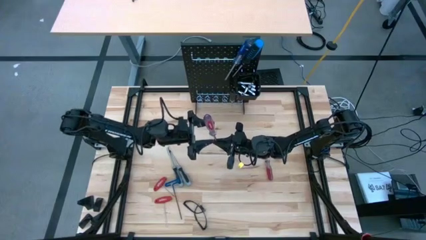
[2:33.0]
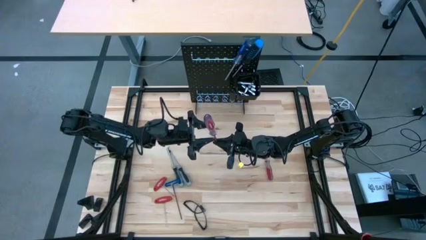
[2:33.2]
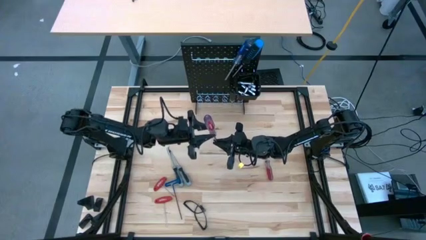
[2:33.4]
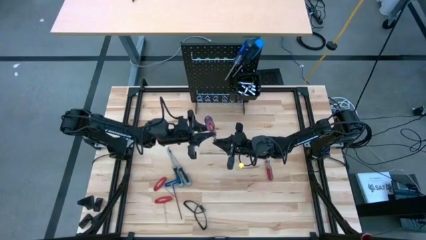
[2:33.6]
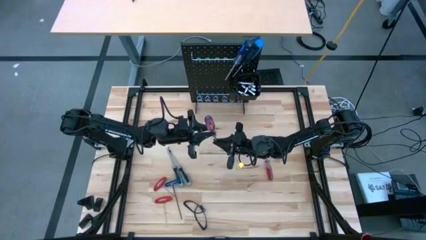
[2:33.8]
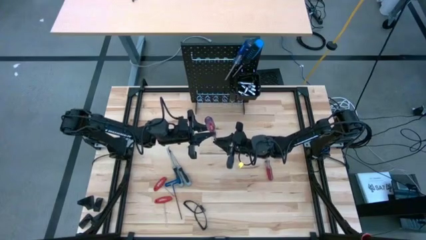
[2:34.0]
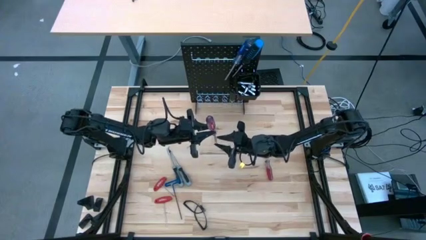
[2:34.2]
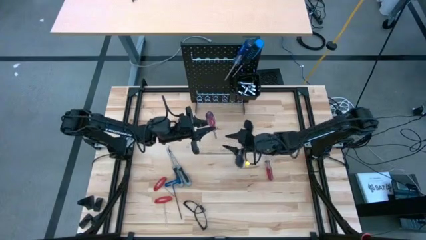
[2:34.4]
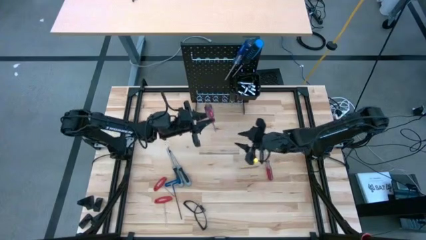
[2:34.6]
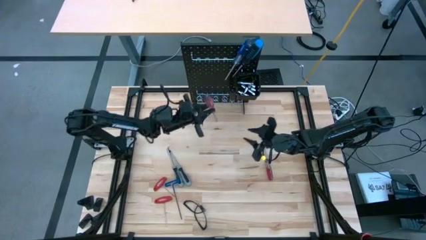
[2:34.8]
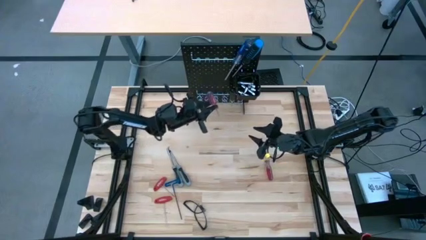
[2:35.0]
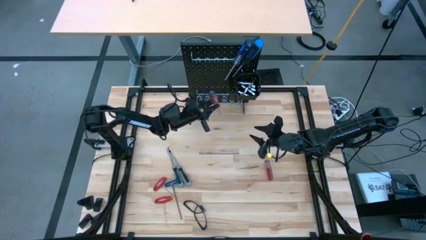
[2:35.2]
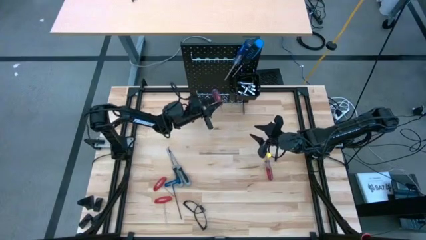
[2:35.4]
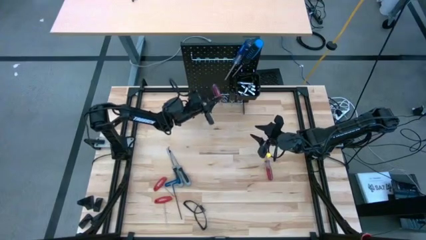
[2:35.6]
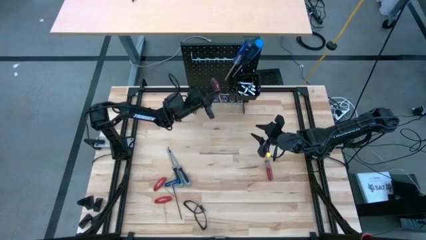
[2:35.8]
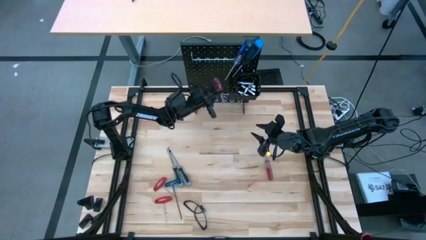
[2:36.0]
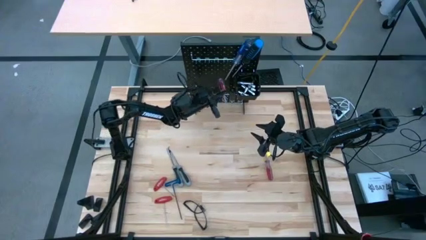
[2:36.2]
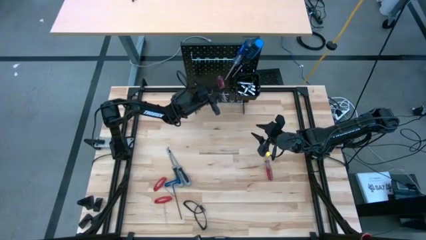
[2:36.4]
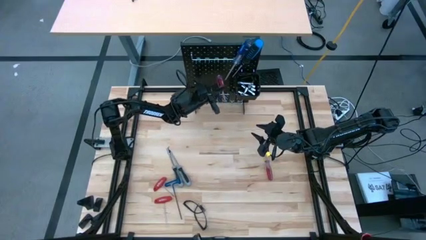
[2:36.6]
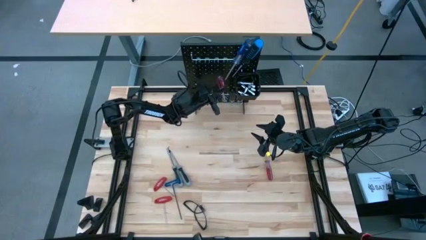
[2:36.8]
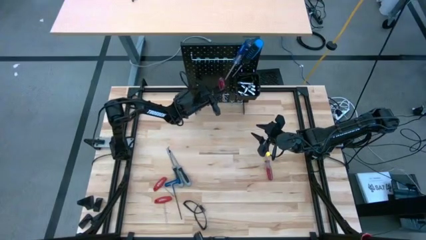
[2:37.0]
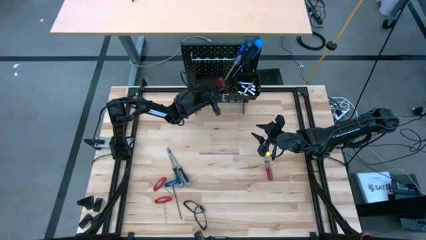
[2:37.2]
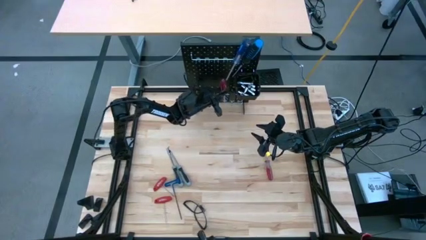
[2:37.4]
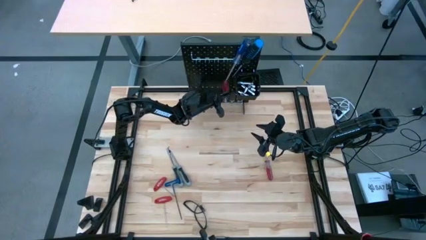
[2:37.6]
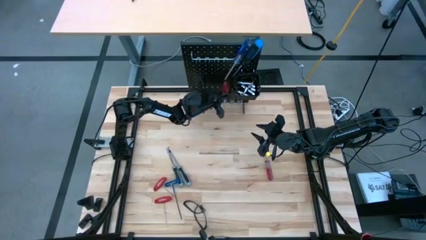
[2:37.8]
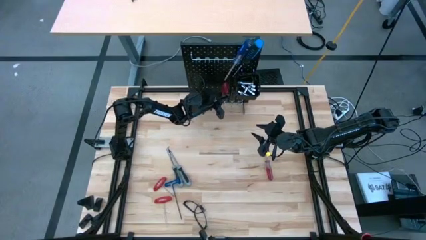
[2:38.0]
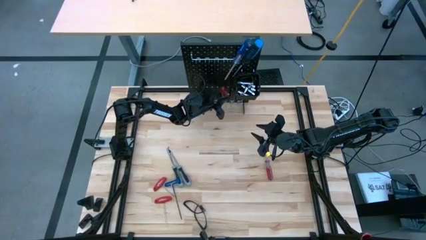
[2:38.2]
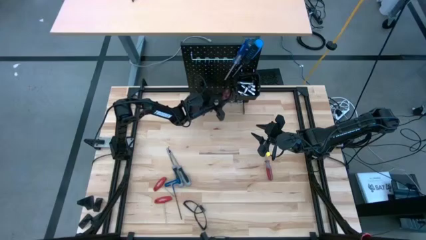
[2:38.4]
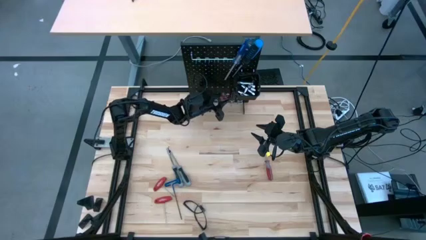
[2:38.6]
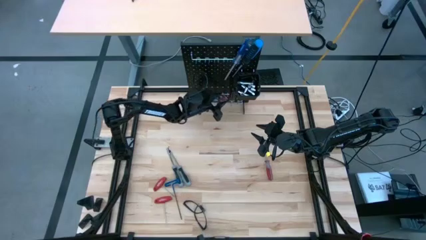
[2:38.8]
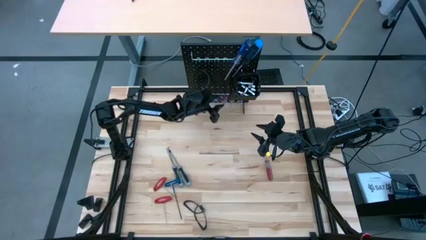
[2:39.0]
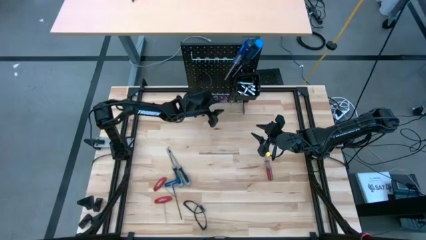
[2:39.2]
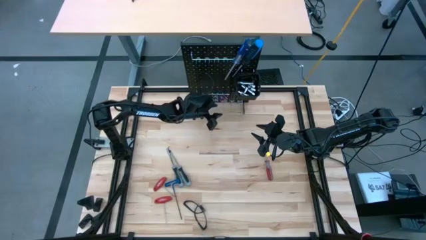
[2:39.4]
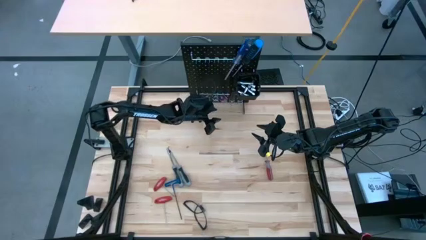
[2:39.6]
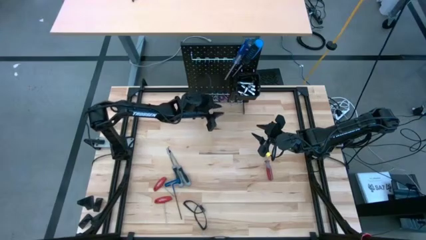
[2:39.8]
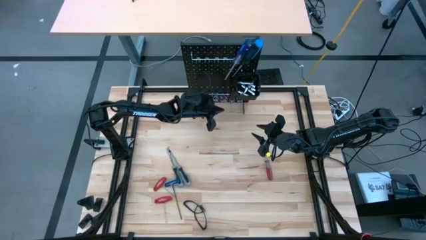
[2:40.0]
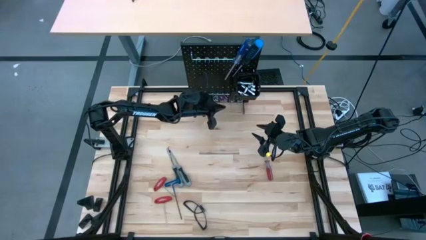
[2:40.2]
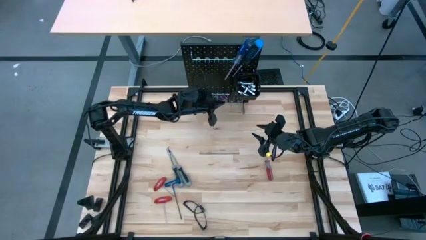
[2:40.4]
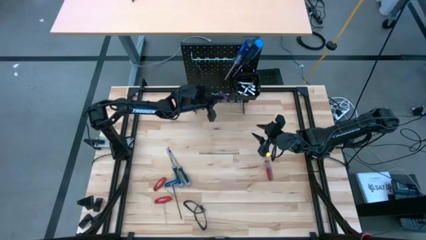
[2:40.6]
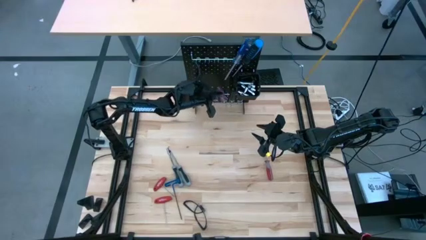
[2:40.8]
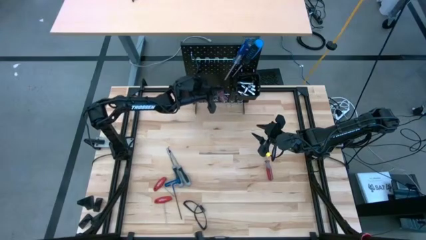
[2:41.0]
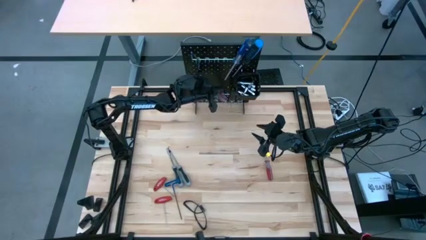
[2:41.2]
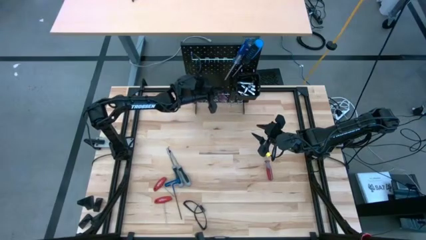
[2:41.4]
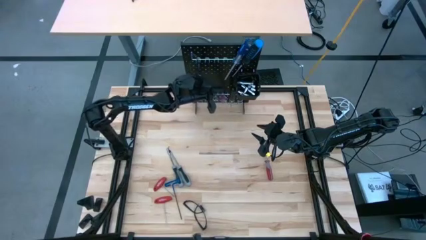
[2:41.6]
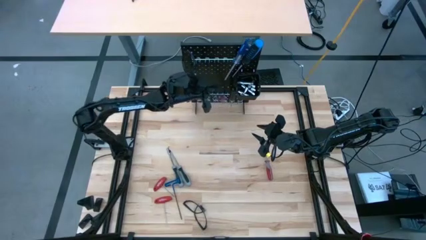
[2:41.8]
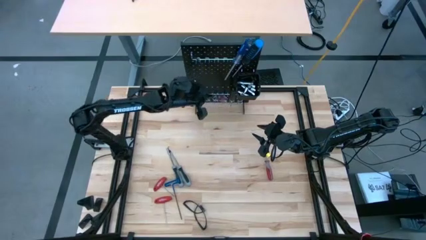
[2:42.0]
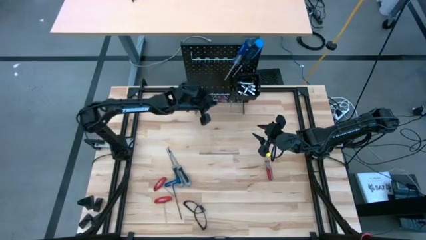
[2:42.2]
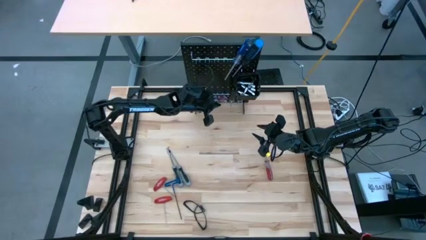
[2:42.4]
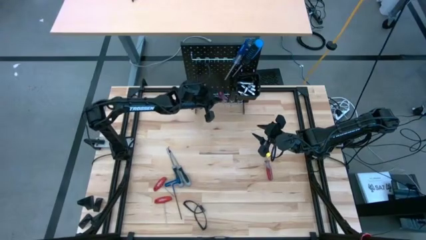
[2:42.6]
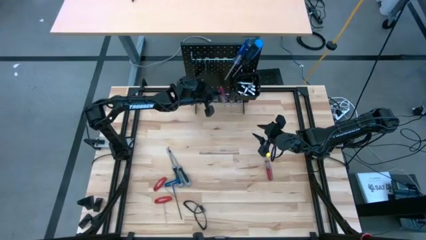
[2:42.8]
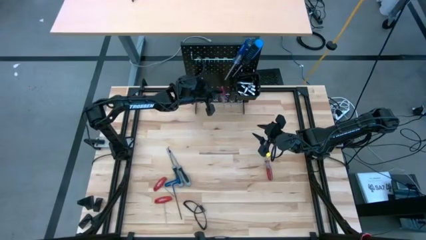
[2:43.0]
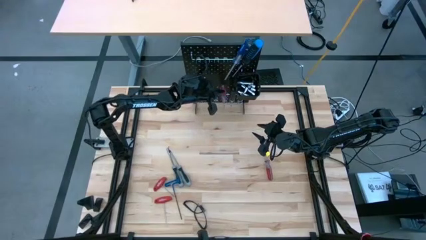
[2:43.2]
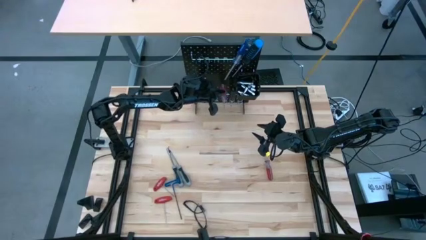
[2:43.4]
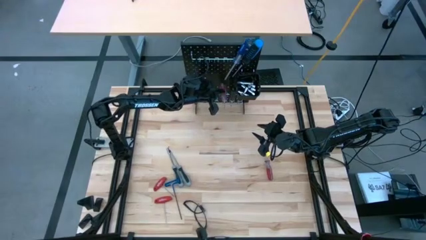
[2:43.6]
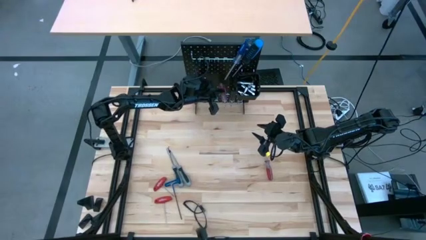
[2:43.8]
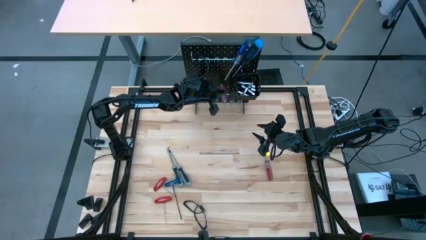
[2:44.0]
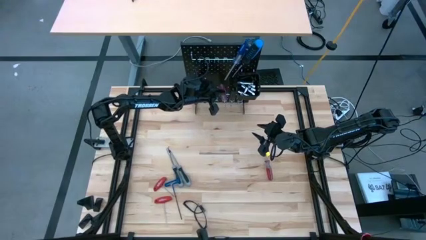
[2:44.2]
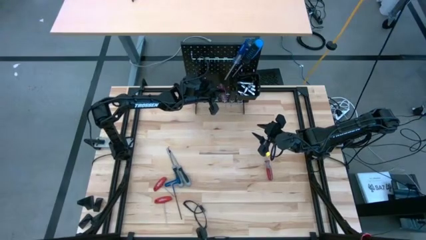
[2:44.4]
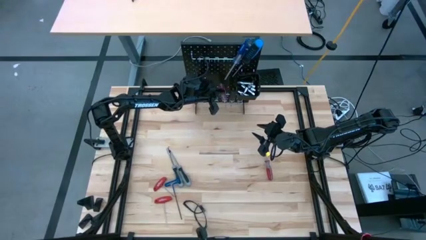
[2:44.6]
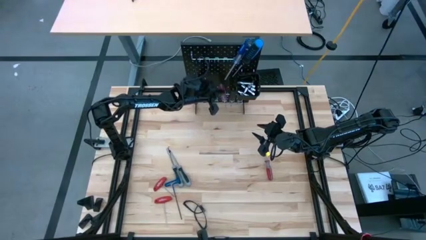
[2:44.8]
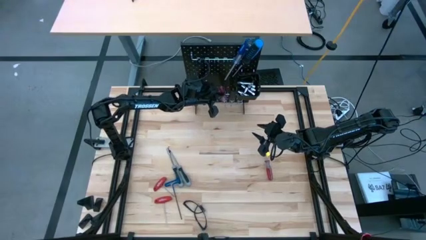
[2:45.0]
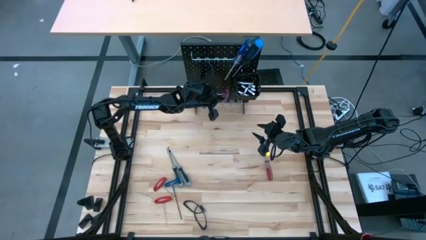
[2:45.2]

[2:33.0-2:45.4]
Task: Hang tools onto peg board
Hang the red screwdriver on the pegboard

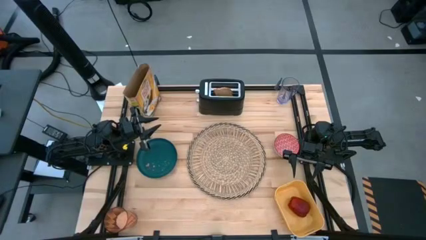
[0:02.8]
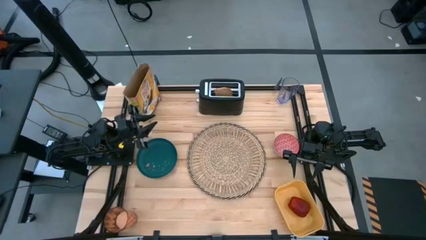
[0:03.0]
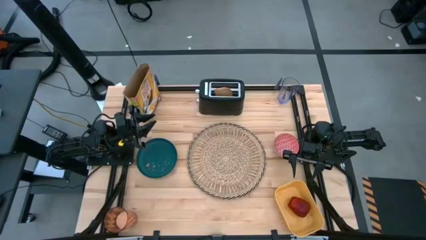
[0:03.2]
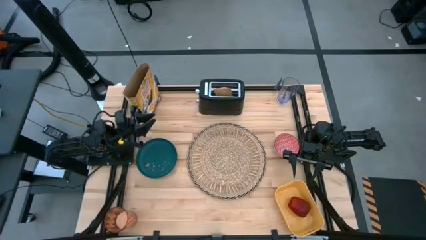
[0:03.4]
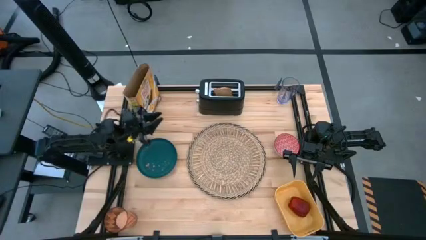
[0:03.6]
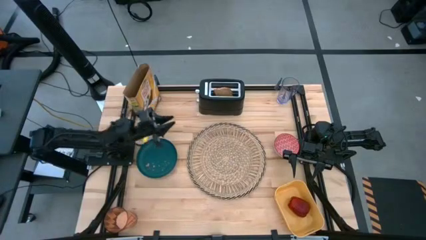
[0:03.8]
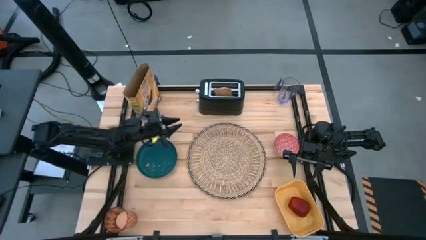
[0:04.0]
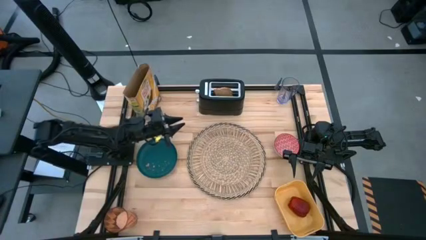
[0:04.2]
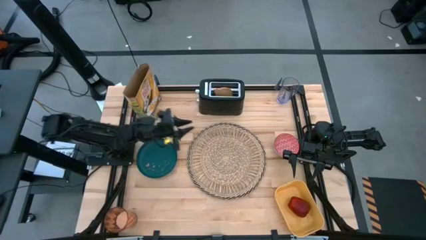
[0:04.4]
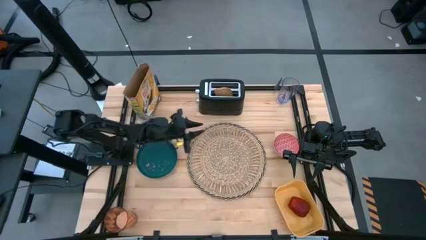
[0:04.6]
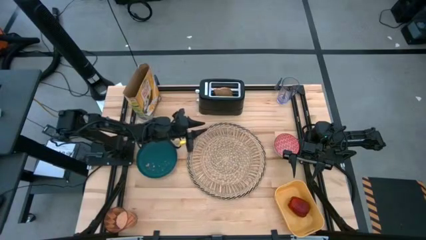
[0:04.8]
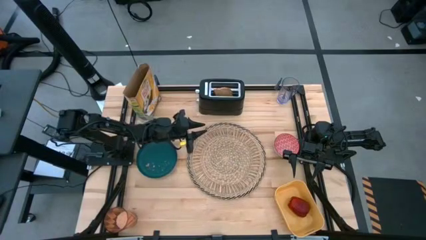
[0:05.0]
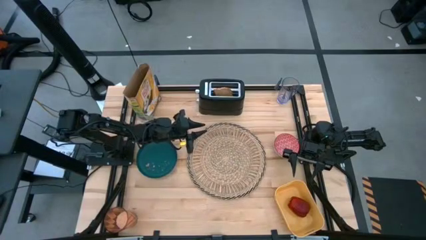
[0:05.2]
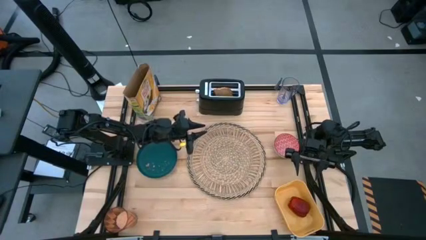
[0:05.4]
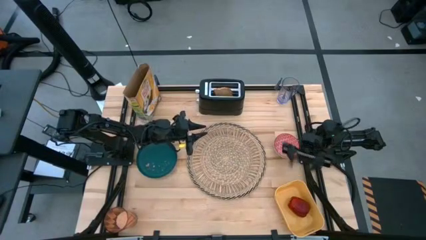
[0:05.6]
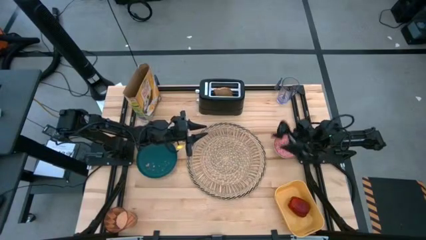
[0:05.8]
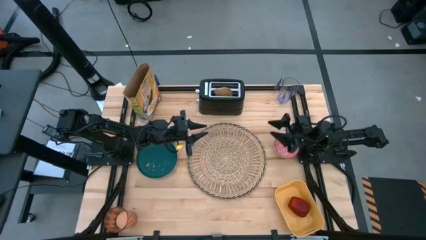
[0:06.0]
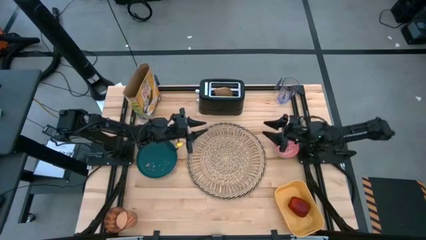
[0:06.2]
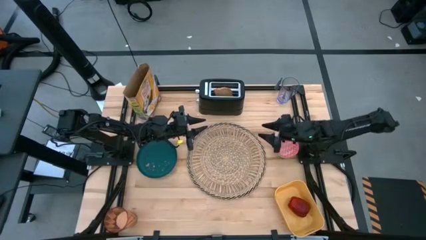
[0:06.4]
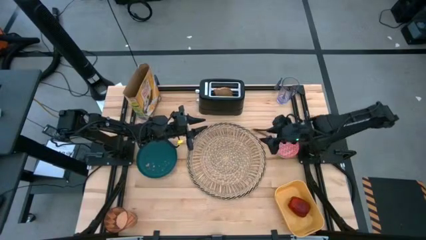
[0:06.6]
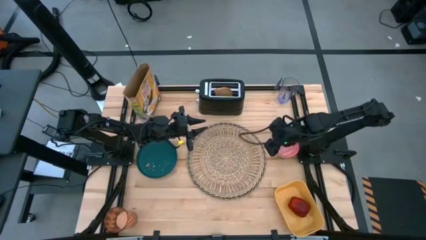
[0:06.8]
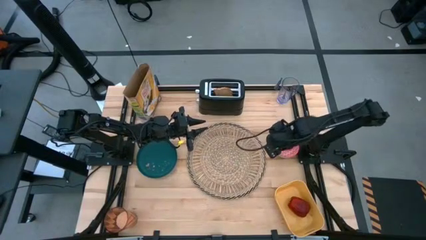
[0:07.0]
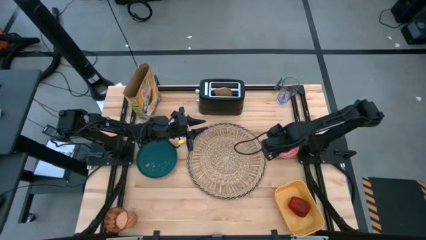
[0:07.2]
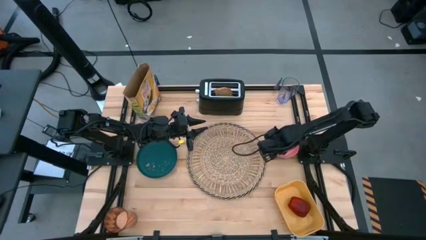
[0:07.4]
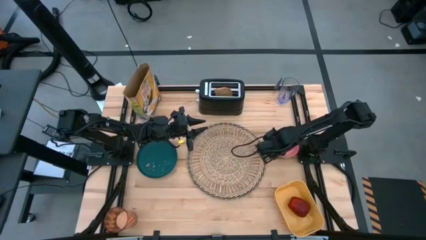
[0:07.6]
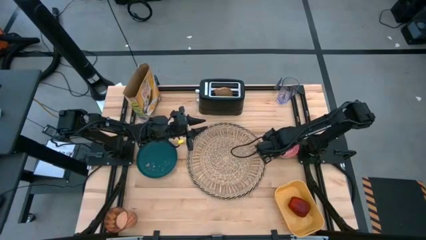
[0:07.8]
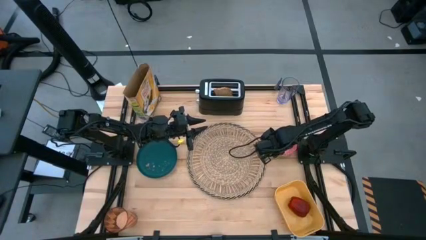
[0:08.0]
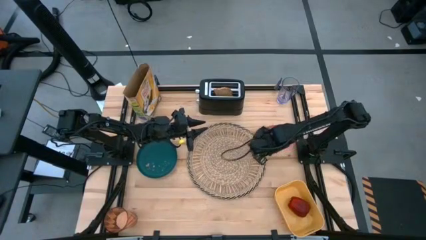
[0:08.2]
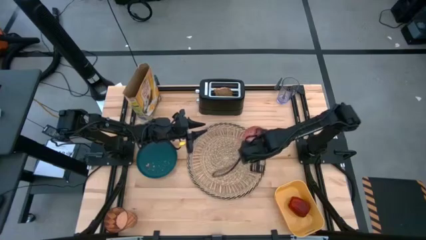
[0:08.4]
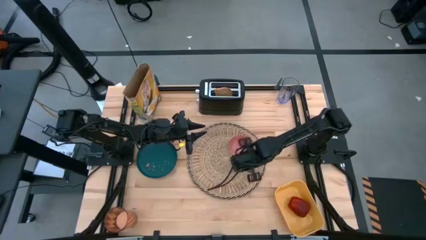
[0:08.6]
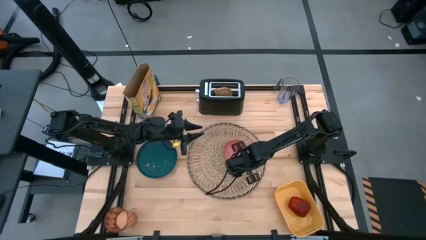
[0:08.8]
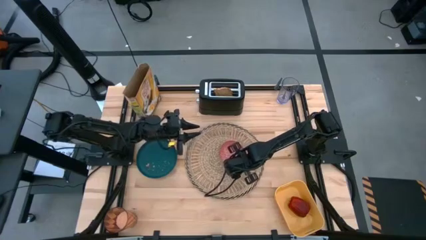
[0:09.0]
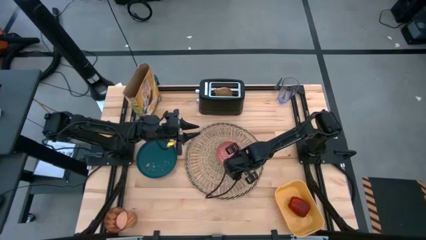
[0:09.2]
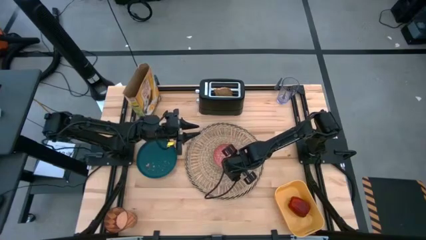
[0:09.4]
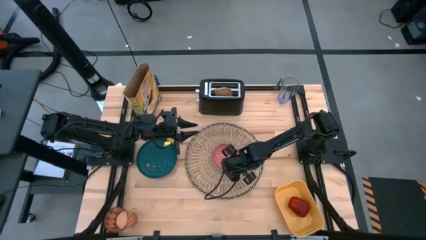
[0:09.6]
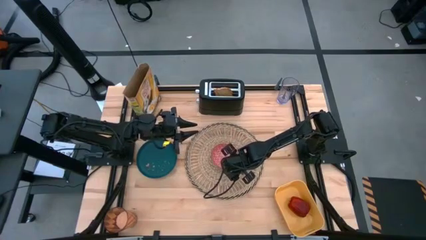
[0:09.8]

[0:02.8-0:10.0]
Task: Arrange a breakfast setting
Put the red bowl on the brown table mat
